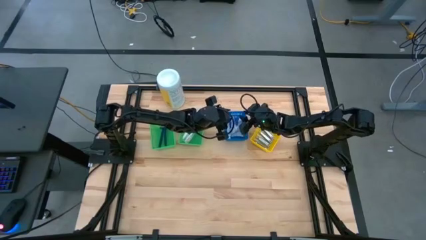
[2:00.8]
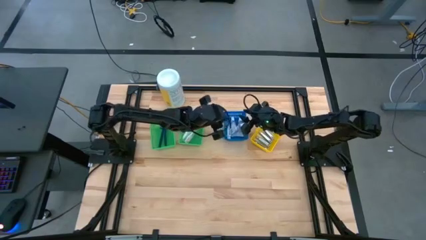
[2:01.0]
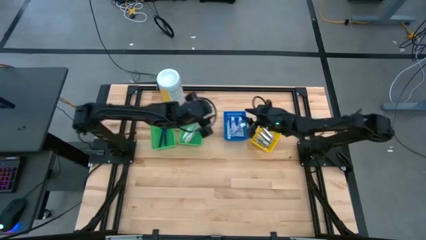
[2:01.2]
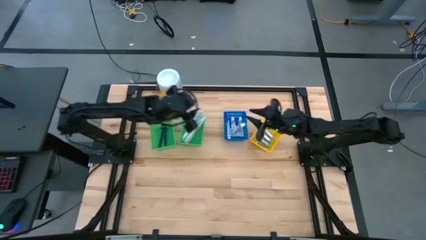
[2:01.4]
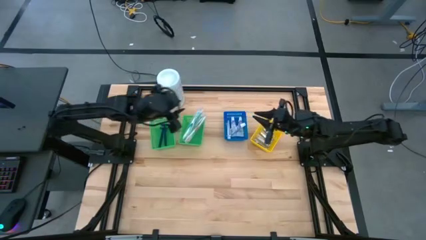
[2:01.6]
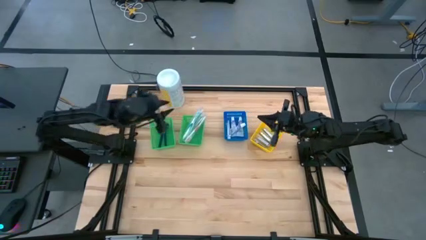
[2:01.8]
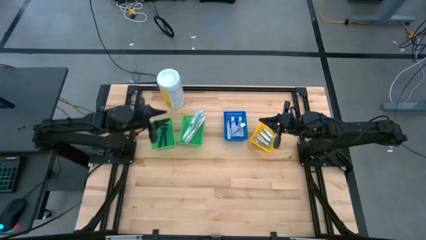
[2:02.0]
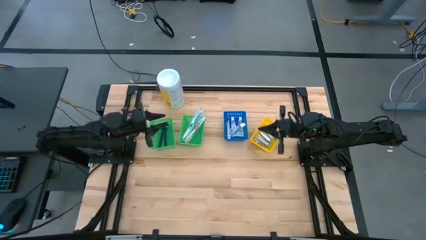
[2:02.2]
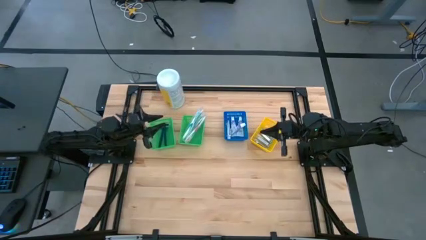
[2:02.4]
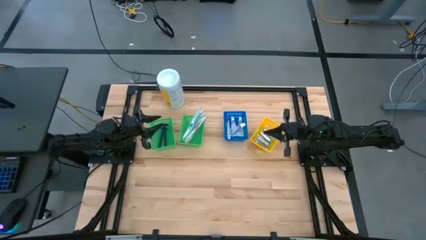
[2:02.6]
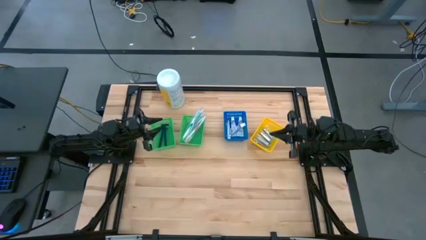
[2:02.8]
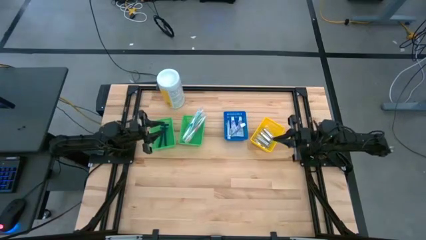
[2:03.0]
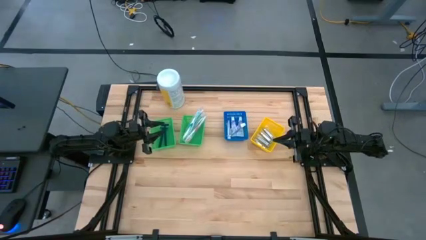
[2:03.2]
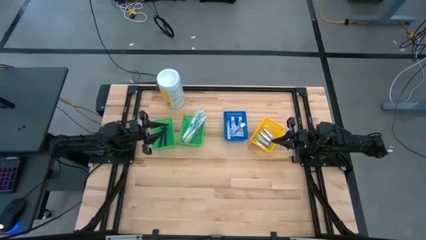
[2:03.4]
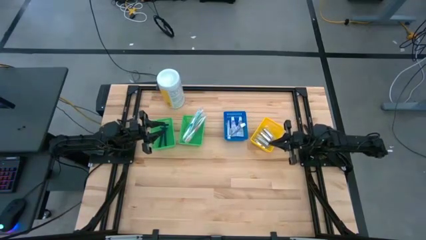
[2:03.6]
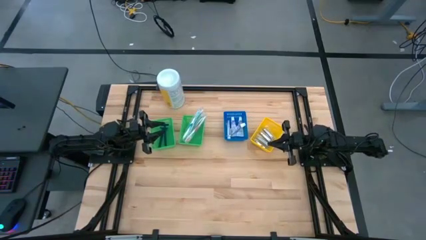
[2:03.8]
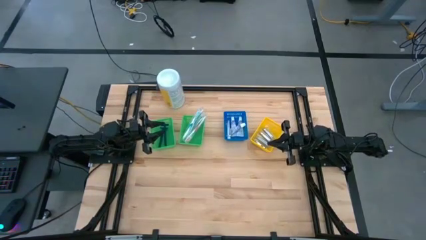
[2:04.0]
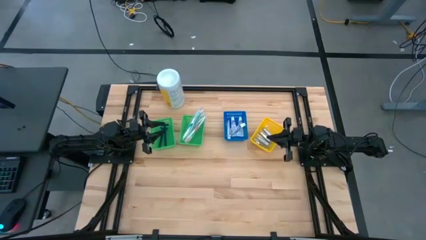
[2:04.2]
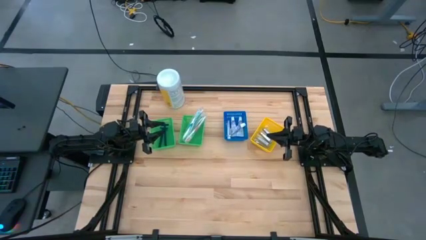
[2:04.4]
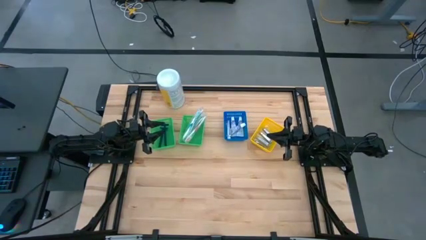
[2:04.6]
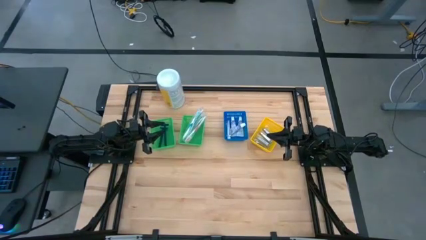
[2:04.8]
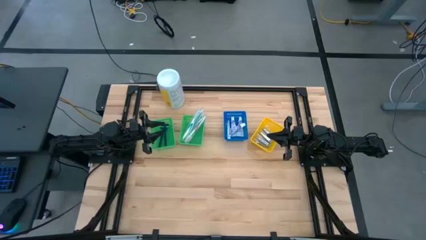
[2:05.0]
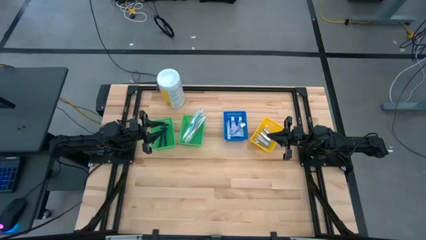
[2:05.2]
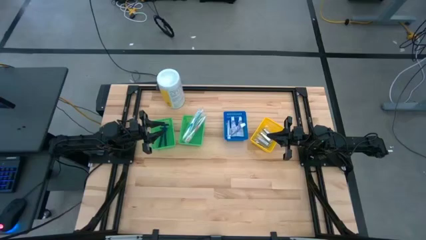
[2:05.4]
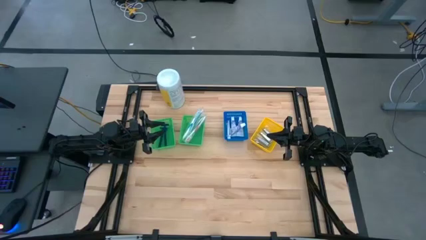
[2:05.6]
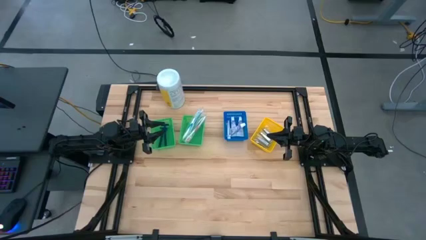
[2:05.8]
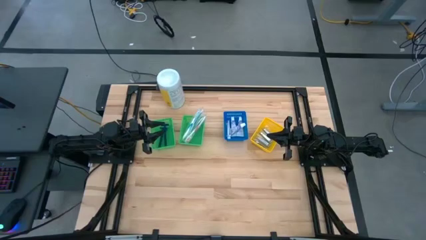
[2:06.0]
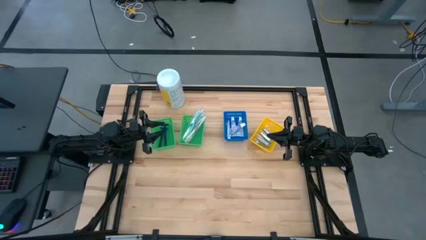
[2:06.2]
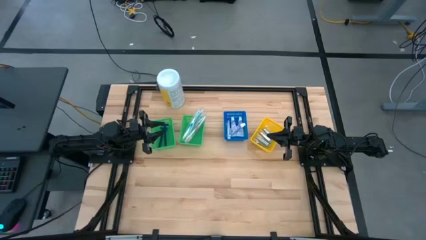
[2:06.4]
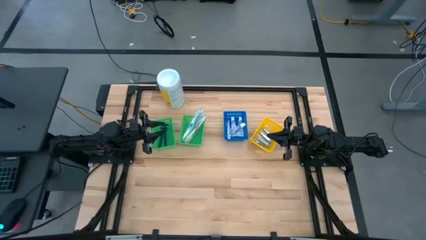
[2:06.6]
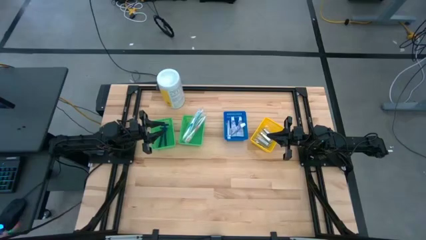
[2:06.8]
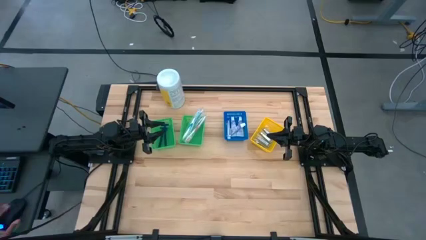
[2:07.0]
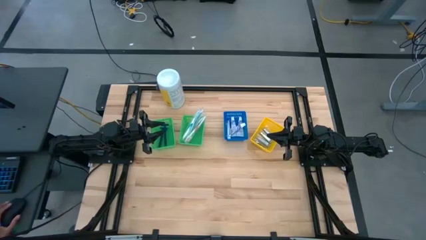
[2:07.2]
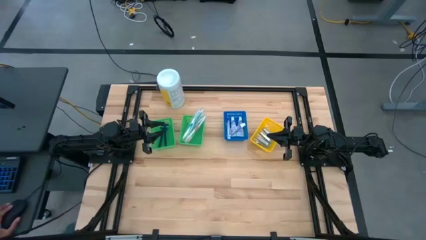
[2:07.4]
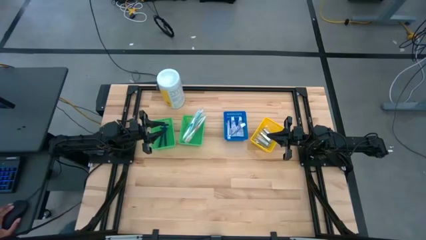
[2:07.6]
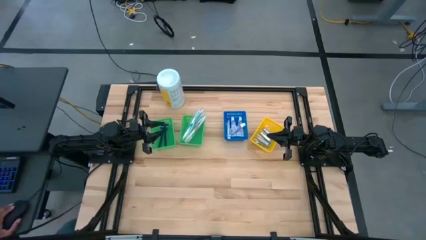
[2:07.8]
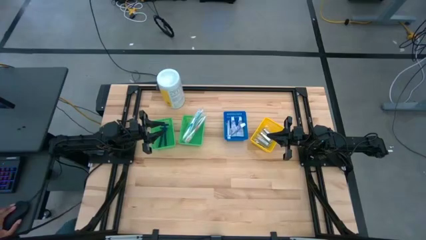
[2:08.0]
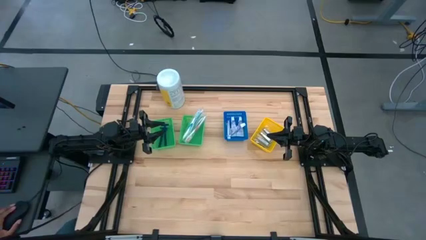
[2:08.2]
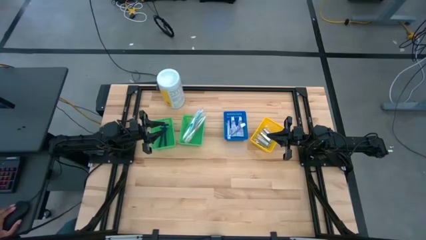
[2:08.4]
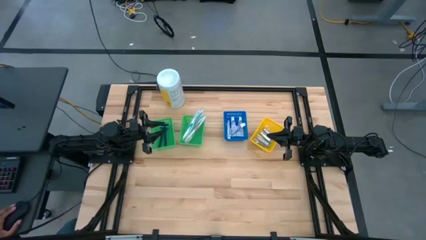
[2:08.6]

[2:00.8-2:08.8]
Task: Pick & Place Travel size toiletries
Return to Home Position
